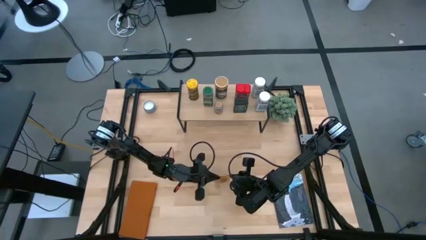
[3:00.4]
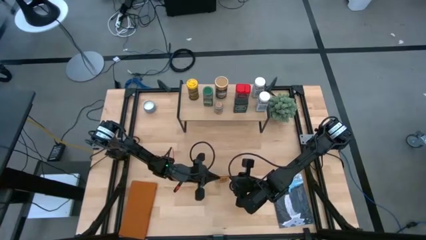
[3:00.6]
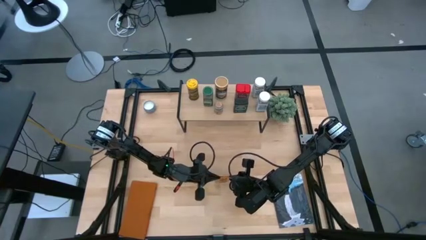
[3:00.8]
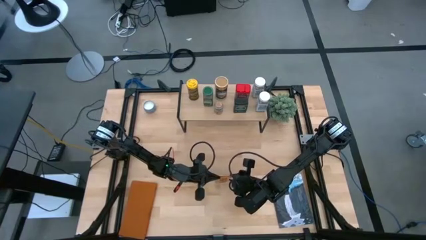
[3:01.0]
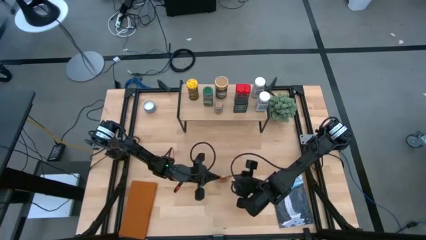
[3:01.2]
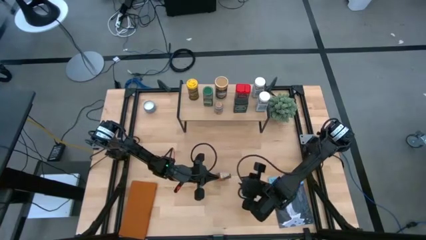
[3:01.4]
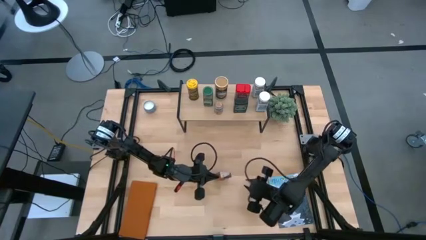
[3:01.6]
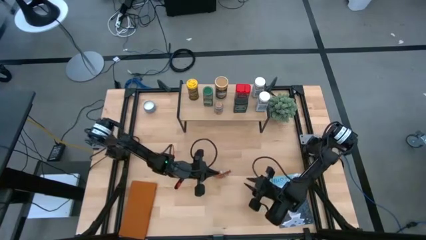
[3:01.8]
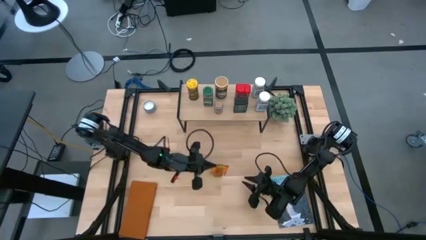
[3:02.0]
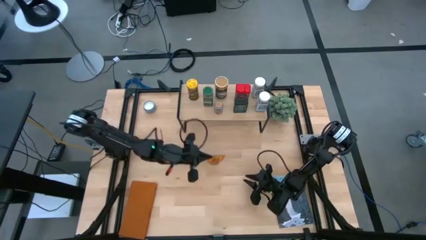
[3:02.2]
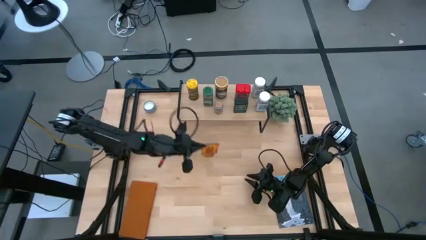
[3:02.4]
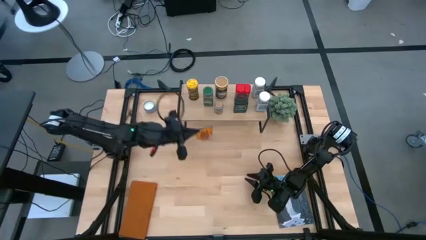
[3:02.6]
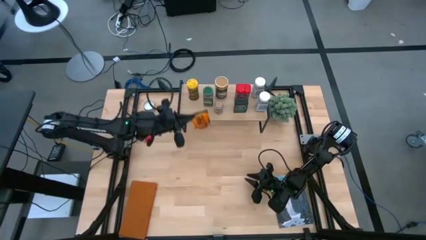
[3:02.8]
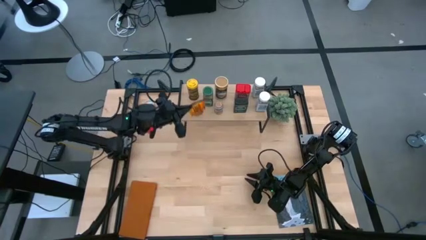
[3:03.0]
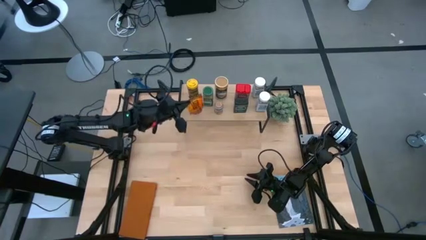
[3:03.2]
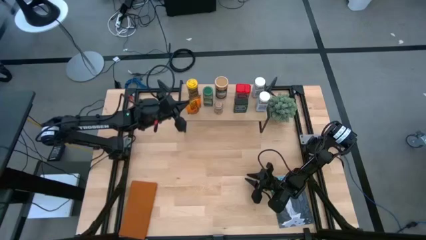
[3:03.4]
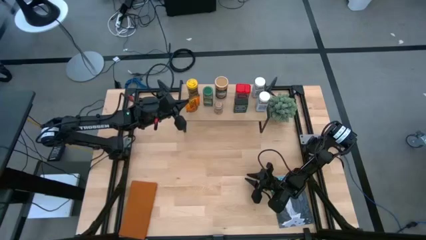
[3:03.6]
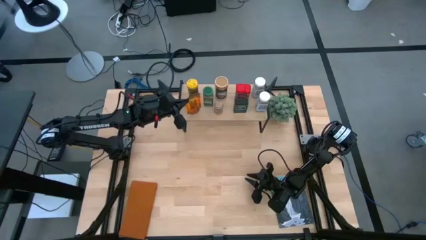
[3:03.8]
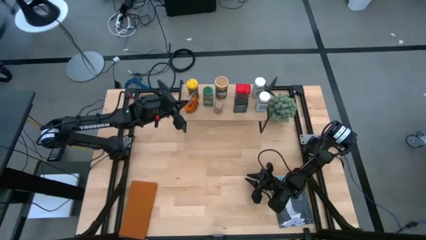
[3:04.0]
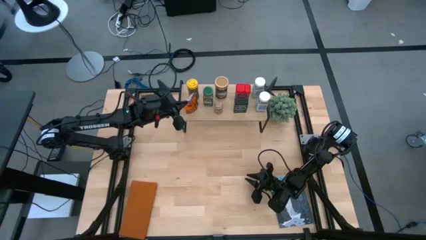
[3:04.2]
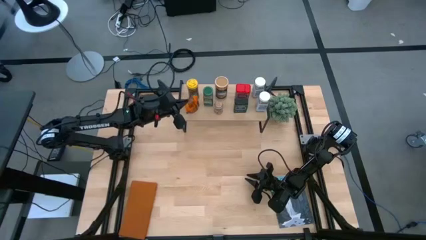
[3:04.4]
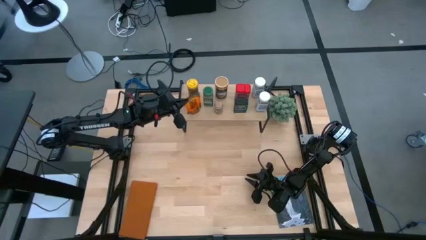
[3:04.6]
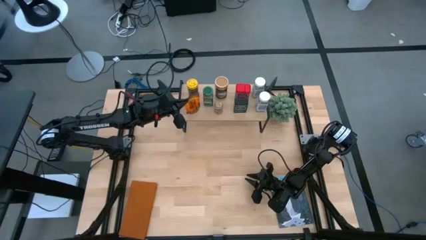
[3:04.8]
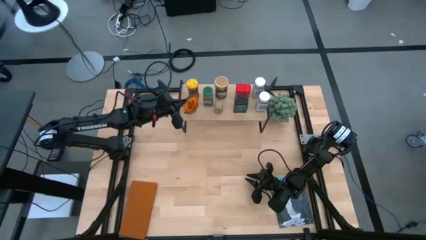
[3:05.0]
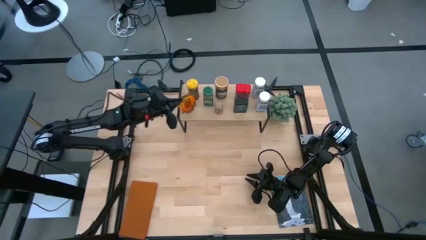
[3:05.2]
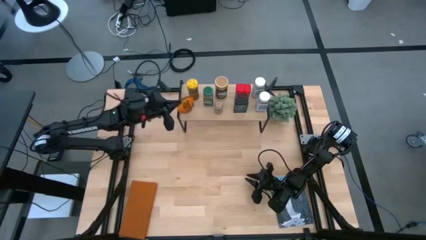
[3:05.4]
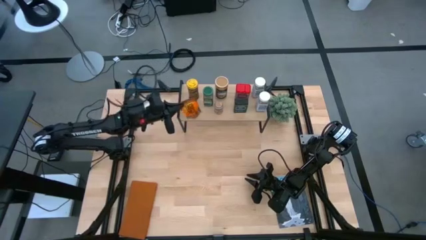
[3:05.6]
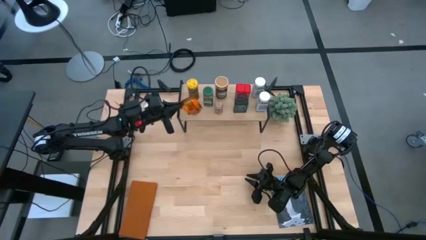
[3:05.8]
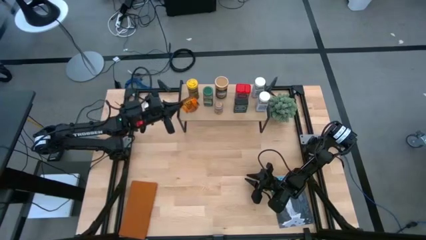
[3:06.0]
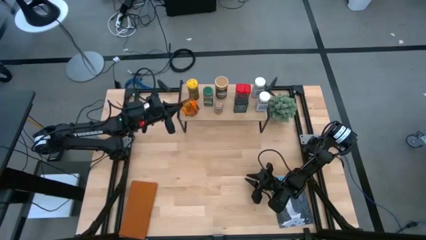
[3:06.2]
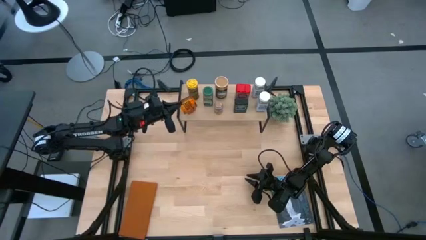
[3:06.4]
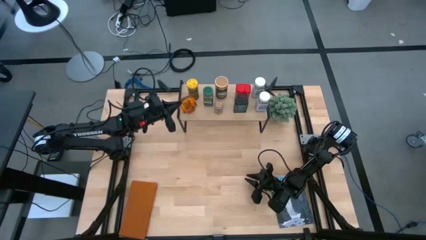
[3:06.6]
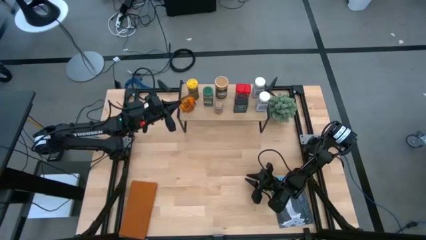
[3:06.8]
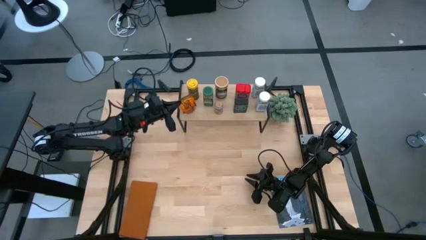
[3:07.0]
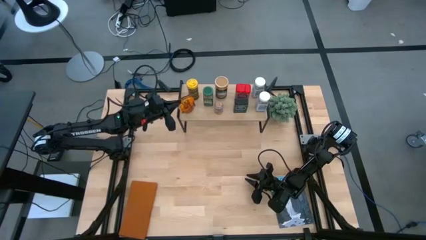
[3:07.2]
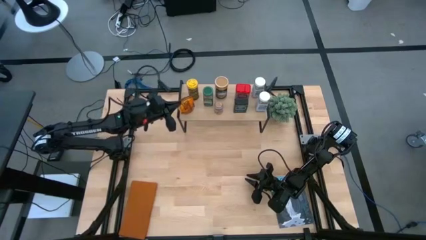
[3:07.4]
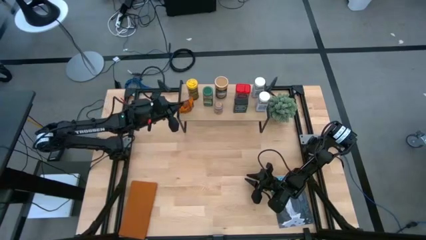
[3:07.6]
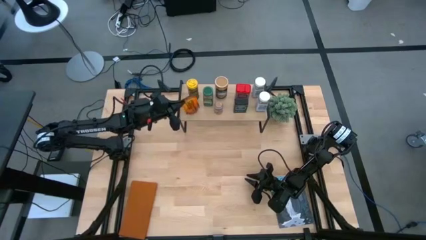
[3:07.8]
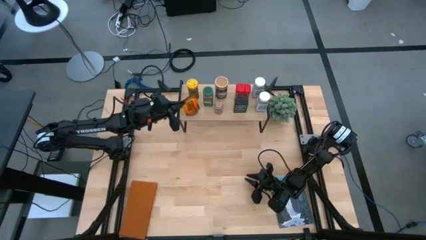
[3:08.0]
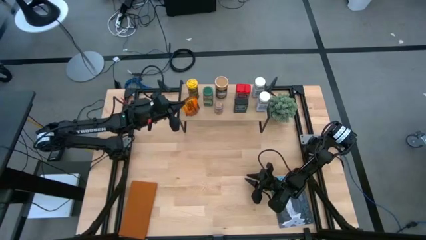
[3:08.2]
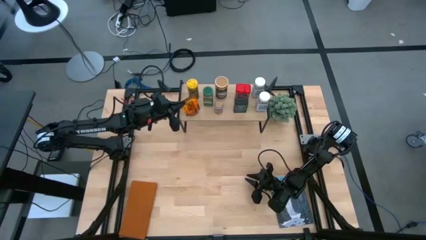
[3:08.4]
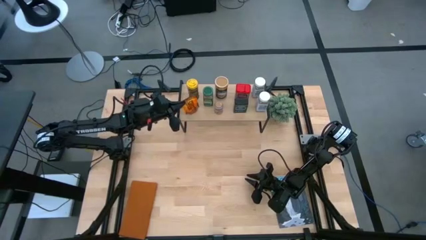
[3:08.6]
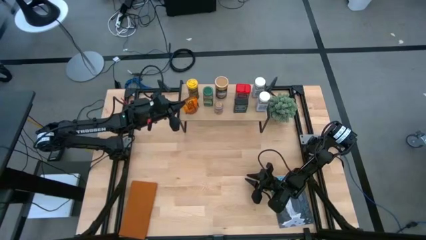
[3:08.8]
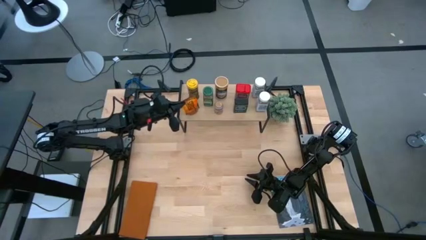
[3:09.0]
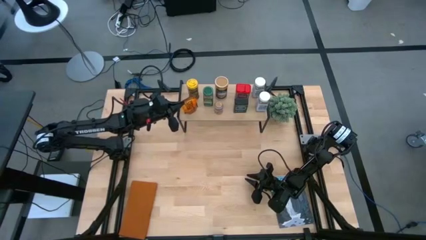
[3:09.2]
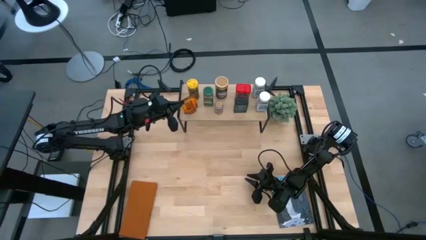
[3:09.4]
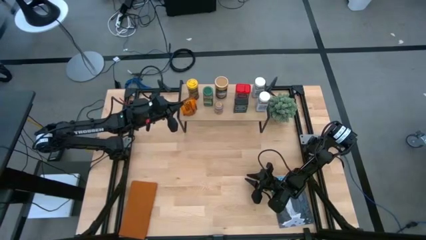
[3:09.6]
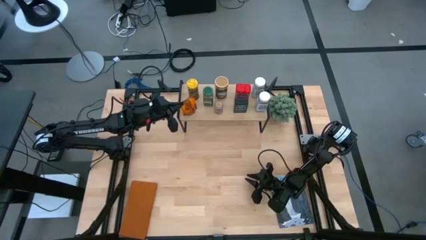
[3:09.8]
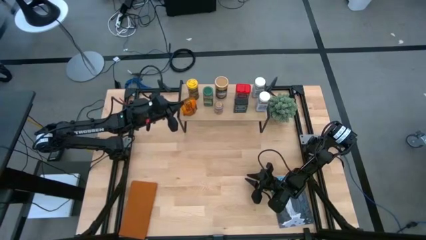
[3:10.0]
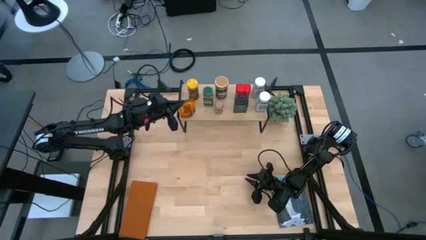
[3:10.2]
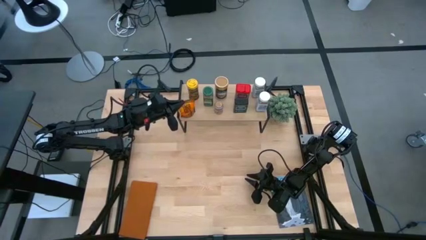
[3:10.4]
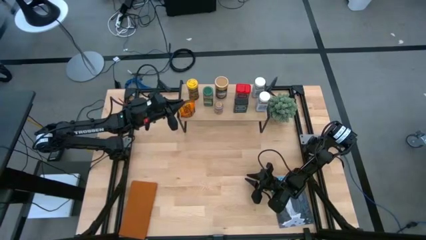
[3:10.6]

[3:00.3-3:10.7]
Task: Shelf spices
Put the brown seasoning bag on the shelf
